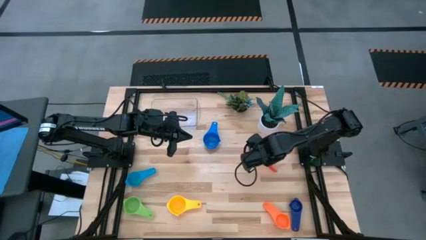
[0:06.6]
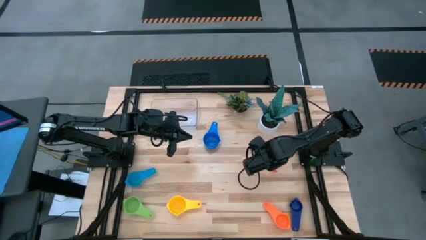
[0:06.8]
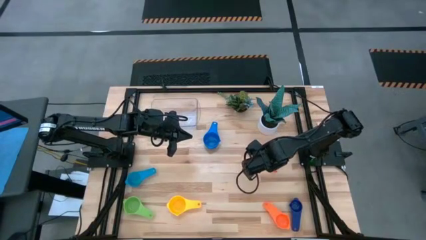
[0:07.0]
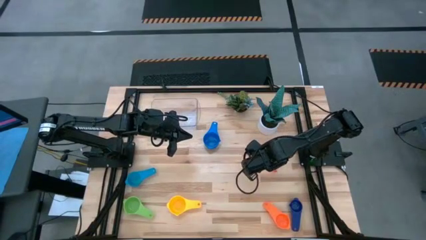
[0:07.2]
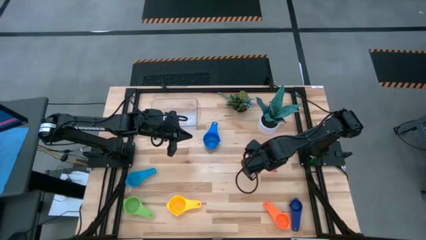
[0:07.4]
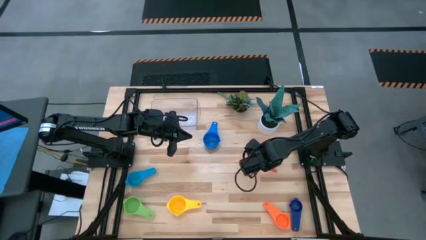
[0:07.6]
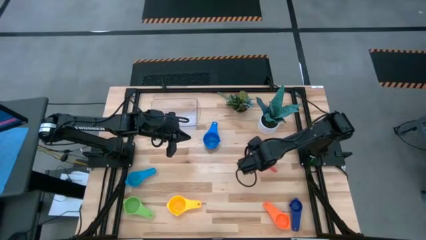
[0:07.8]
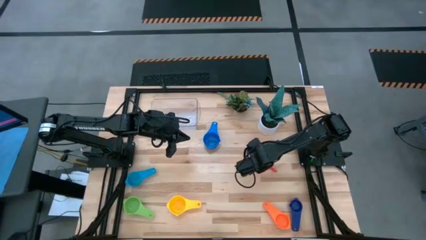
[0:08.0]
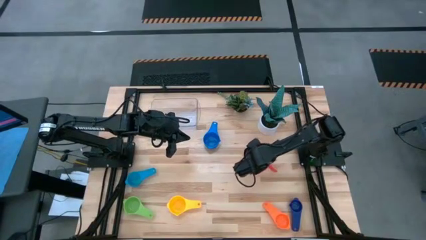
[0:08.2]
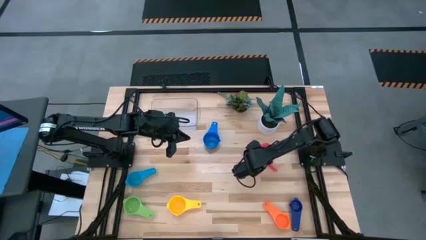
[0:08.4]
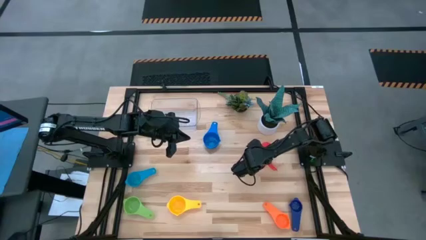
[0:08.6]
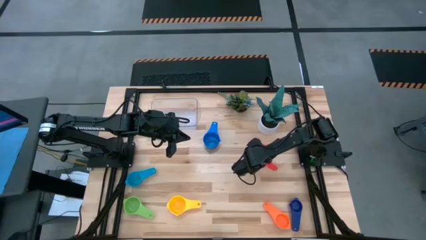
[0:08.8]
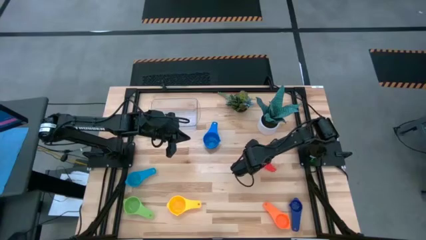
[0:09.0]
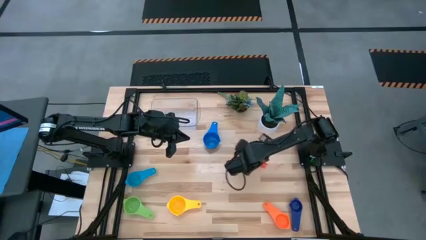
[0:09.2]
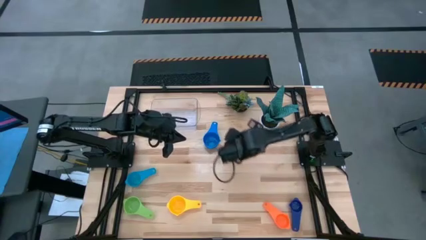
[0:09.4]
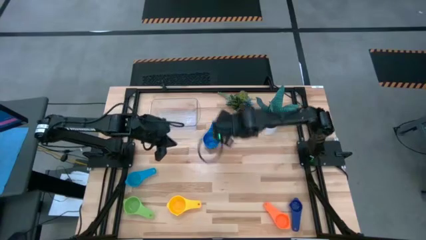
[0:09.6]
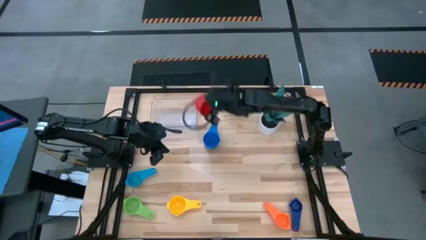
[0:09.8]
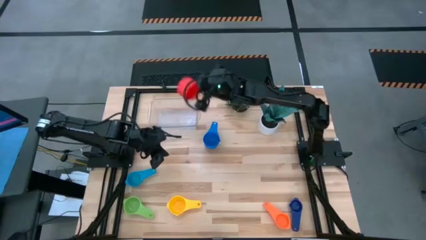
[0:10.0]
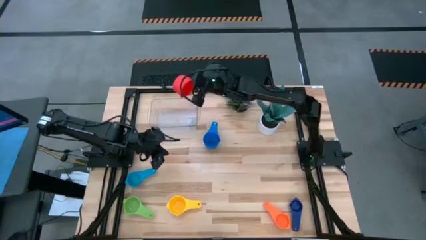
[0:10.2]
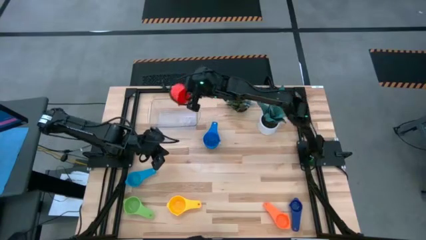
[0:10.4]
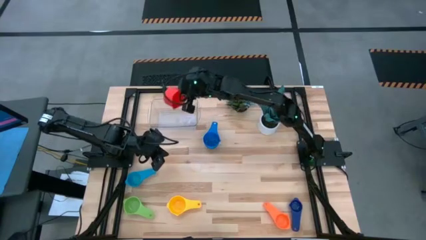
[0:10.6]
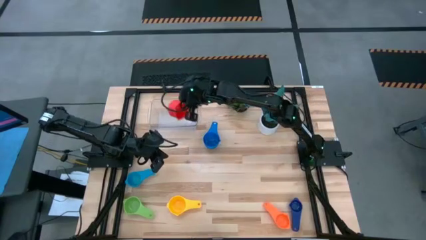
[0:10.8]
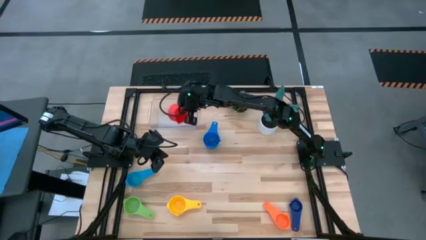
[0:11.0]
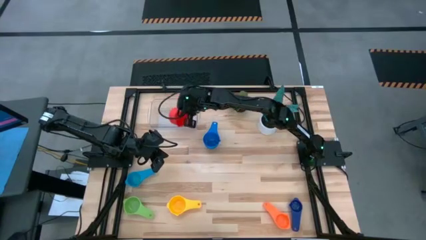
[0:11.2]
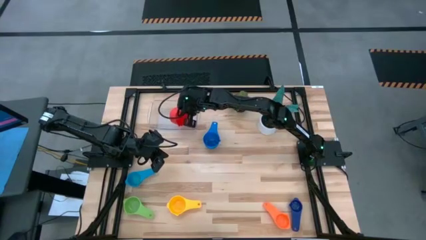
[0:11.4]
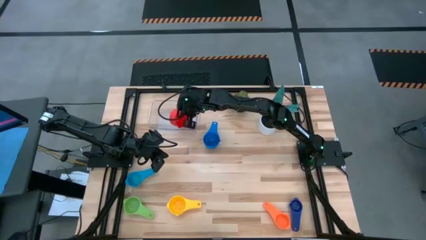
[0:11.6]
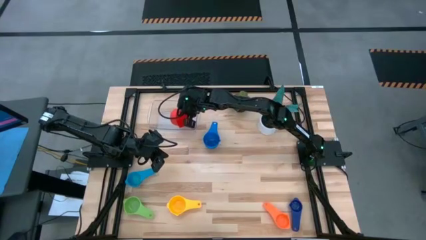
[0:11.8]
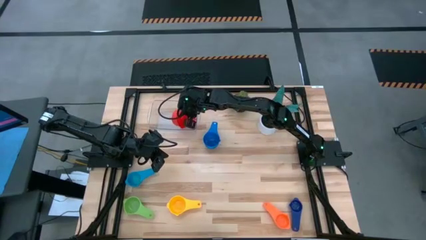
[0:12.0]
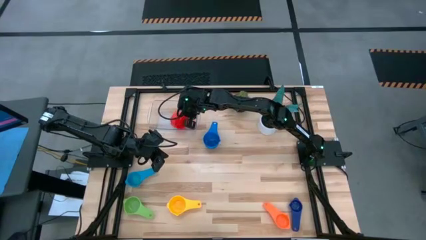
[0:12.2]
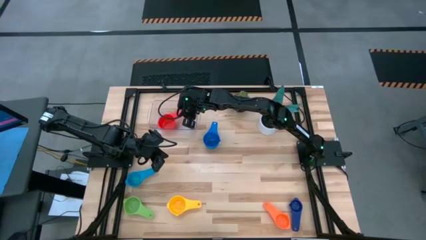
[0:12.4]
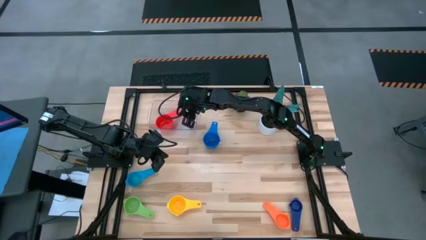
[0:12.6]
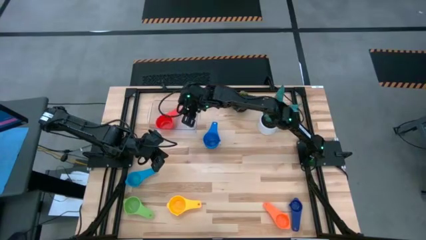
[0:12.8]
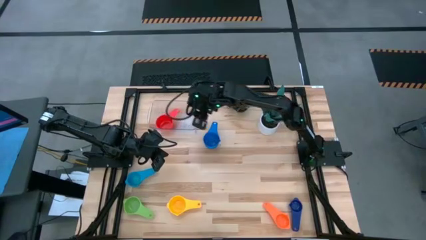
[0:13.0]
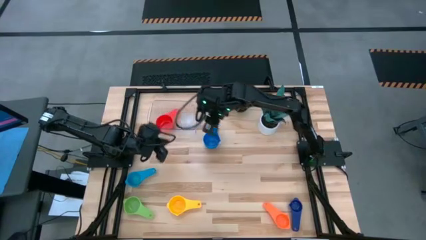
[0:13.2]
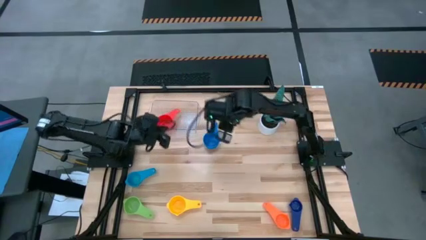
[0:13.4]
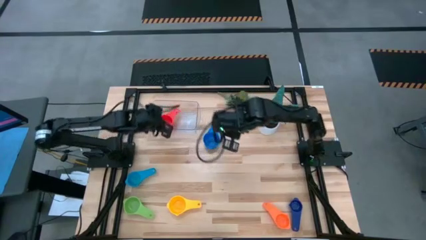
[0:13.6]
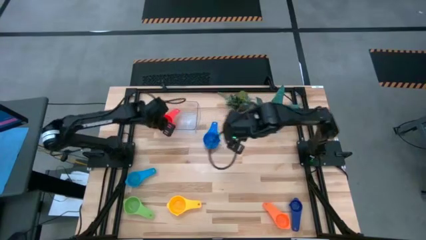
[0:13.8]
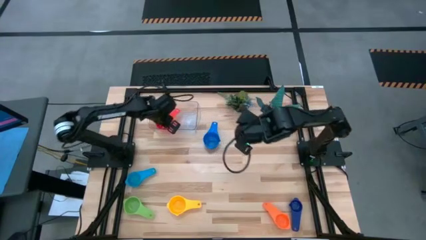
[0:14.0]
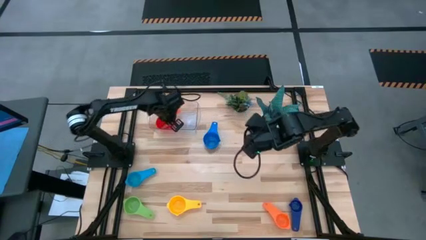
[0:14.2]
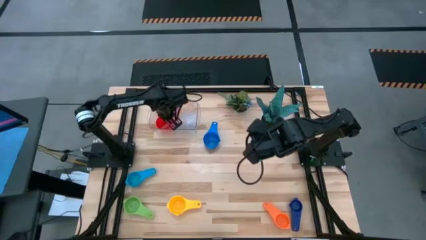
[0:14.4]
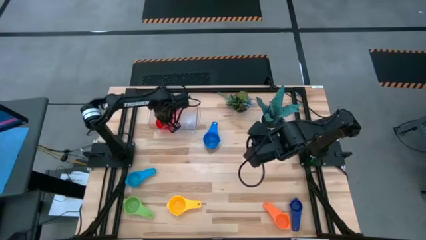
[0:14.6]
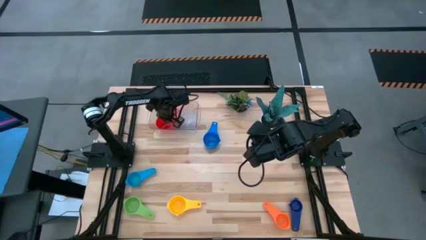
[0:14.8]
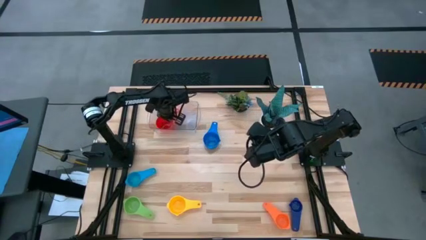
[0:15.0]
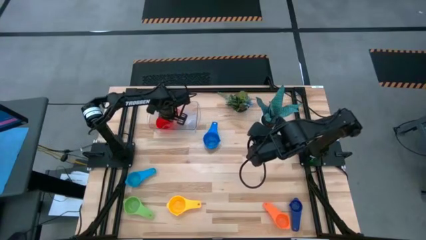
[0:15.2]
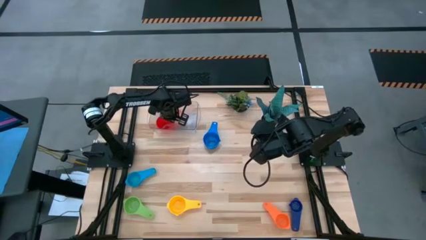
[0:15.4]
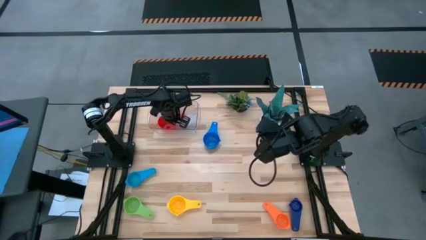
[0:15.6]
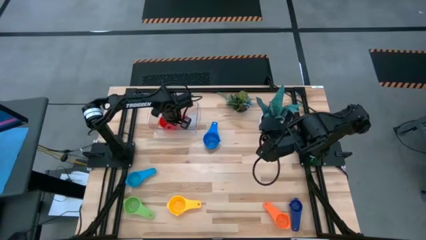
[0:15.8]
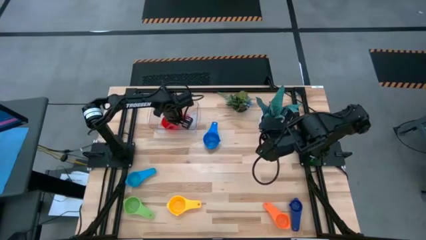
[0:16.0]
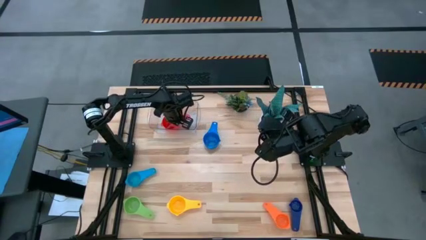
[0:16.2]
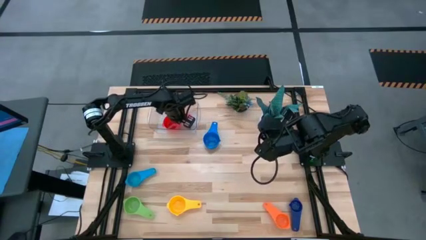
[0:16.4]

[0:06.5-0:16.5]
Task: Nest measuring cups in basket
Put the red measuring cup into the transparent bin
